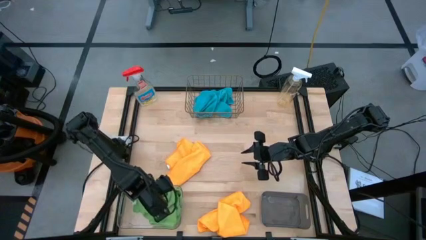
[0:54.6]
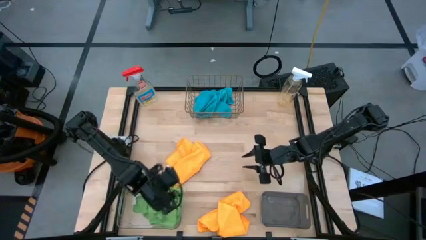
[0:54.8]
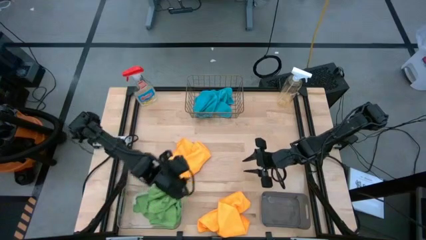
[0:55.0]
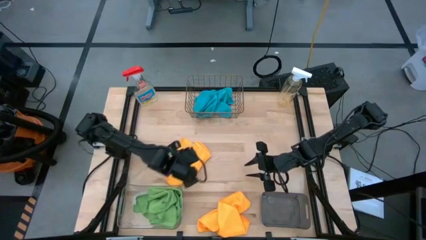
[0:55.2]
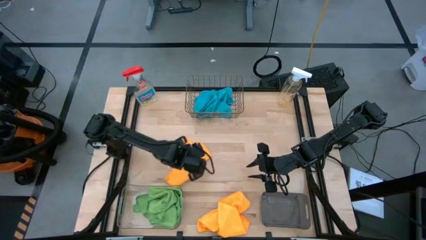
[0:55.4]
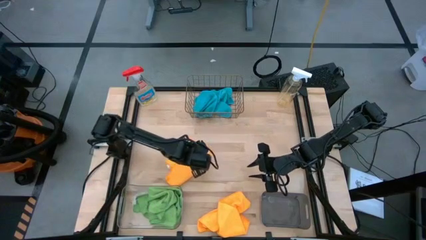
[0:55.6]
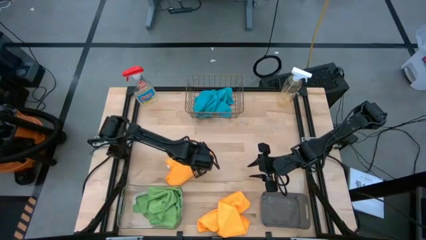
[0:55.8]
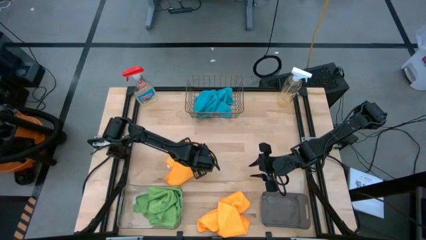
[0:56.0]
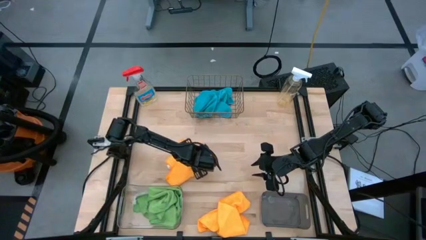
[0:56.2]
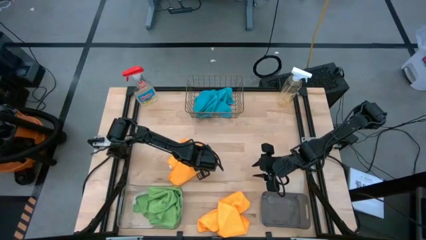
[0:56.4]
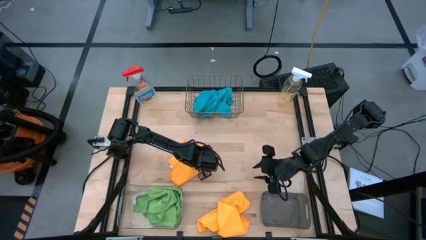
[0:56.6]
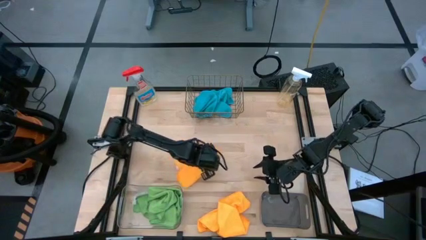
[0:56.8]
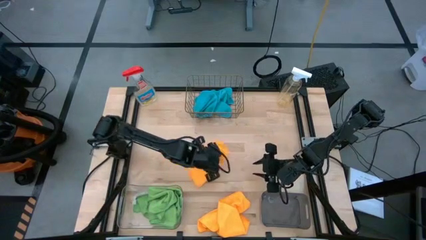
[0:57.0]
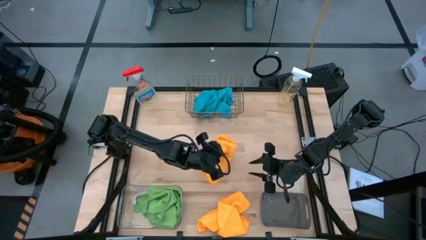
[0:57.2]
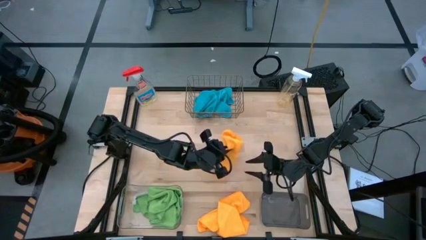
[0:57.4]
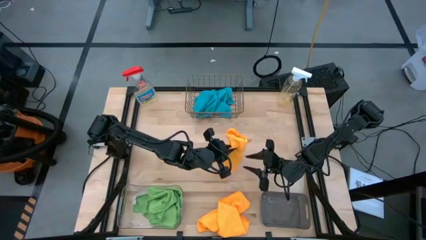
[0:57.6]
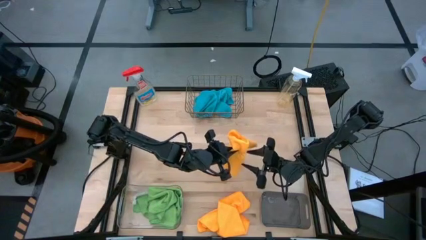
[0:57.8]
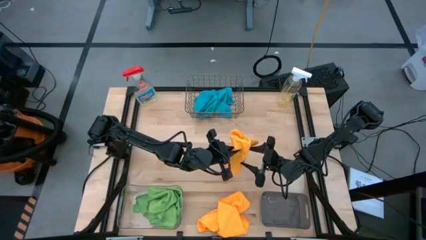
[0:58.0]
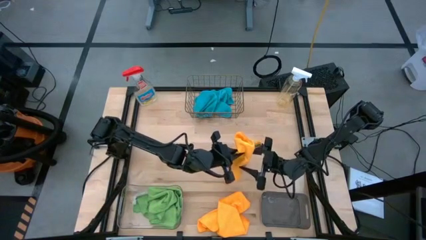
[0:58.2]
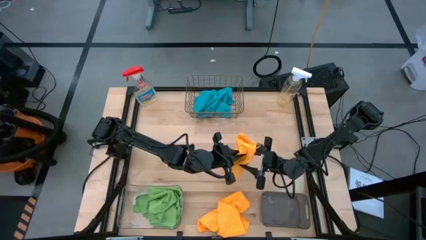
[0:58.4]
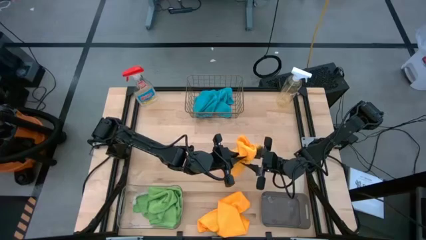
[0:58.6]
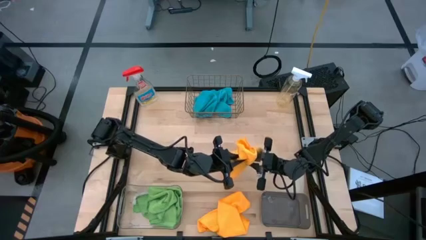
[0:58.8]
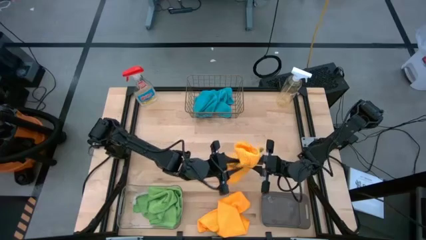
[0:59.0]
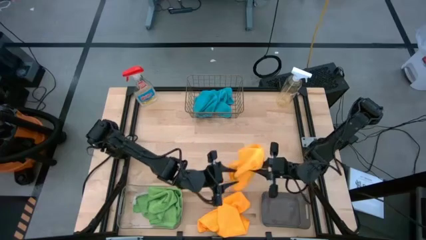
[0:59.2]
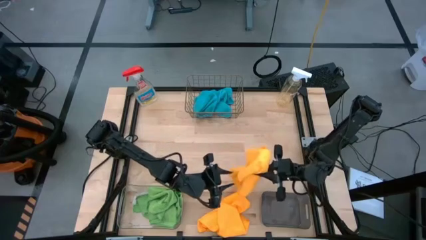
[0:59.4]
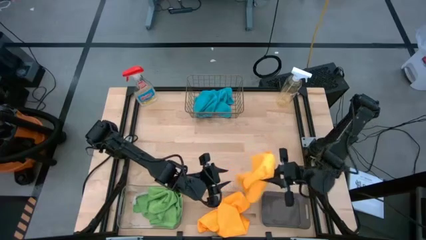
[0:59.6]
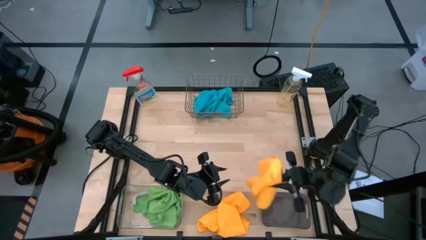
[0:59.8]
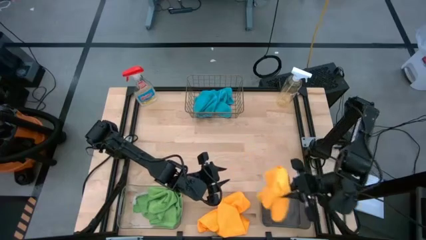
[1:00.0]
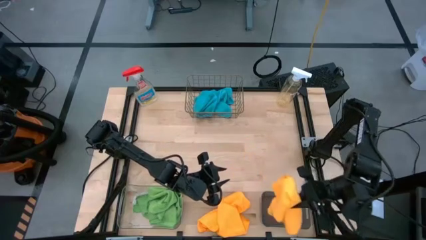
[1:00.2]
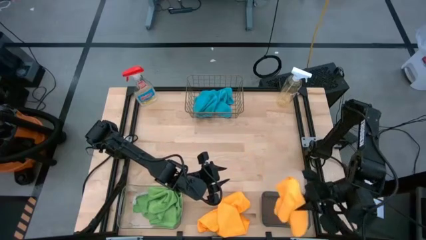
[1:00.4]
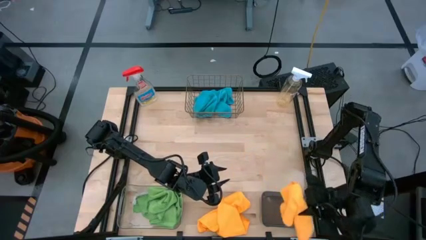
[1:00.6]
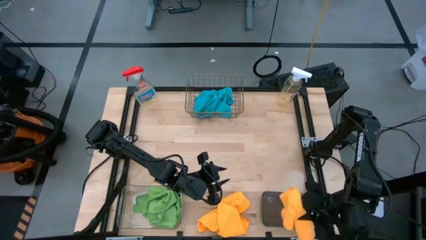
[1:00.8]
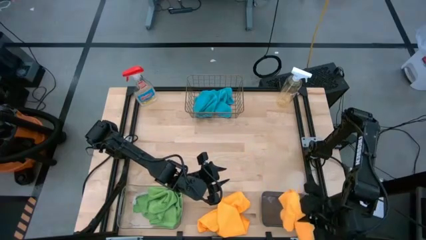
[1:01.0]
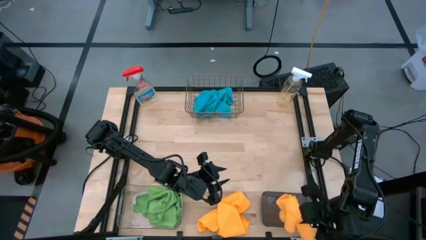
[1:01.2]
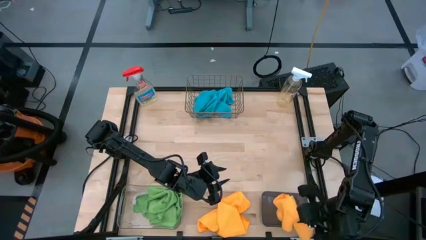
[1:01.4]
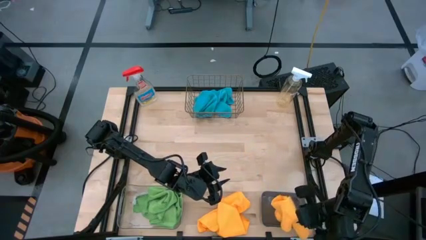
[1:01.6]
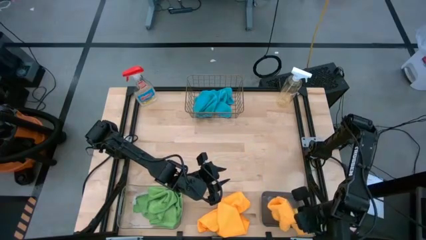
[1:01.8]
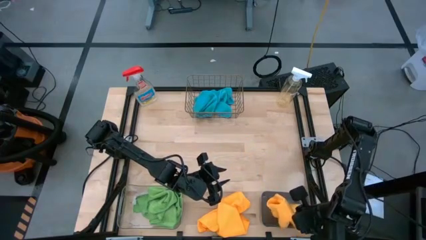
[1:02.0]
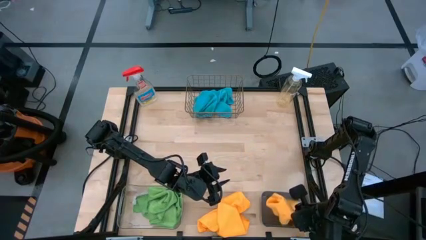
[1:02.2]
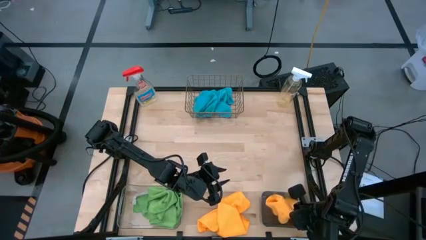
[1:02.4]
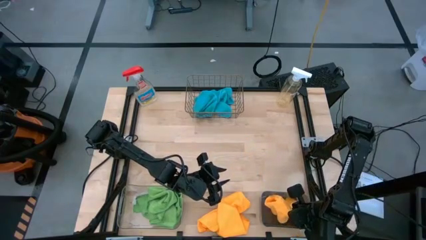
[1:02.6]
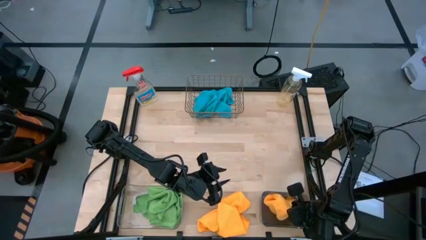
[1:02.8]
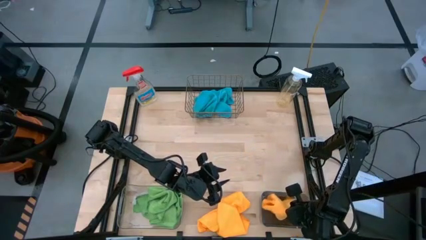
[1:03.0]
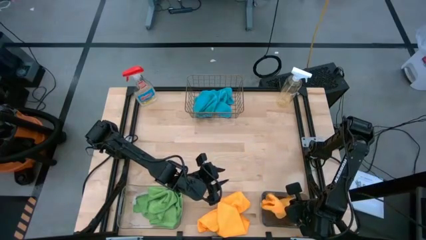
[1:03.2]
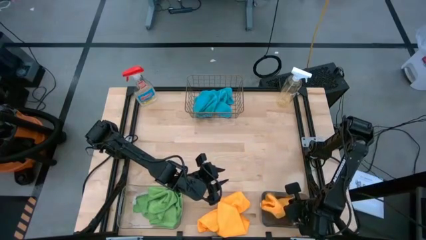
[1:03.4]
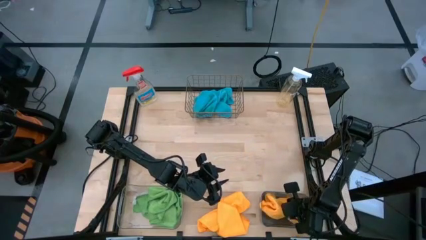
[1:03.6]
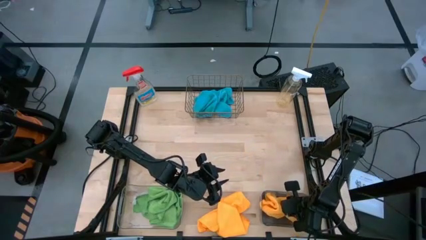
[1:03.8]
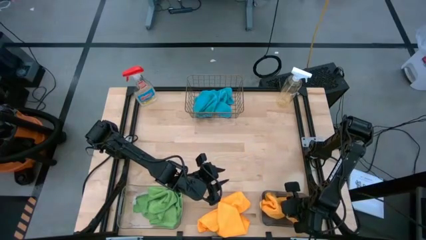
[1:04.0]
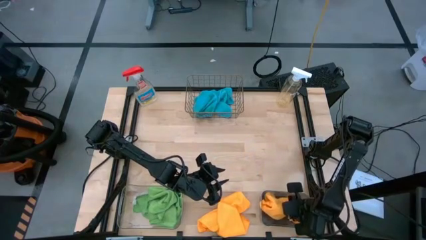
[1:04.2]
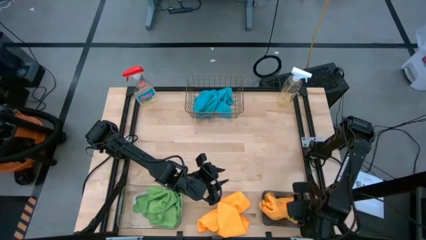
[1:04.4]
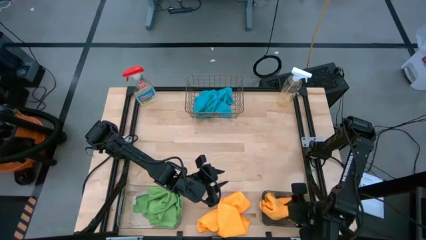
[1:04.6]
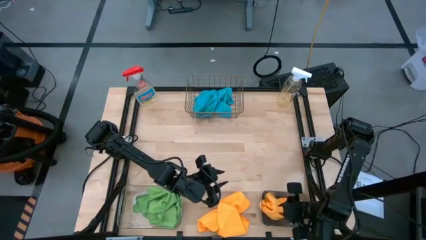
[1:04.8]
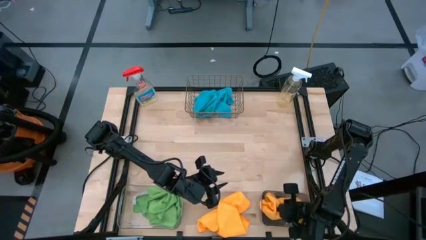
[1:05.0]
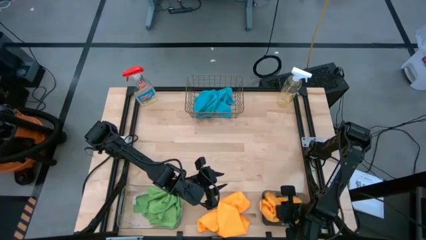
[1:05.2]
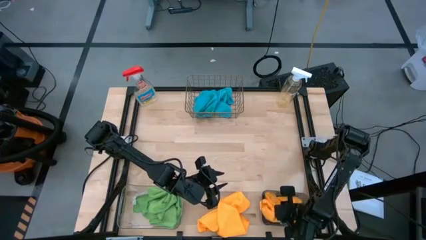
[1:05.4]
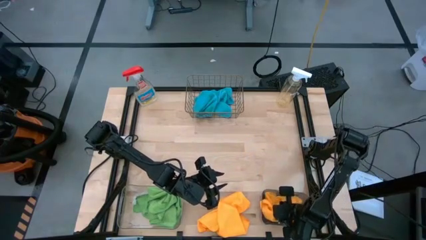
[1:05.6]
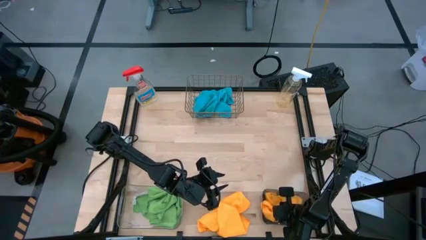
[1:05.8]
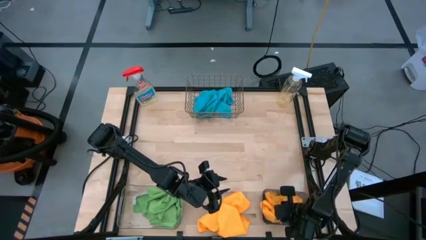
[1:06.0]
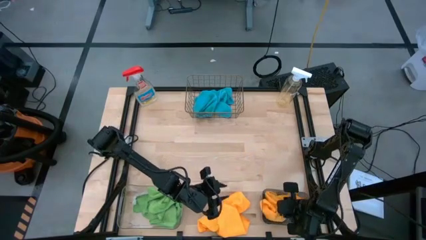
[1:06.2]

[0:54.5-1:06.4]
Task: Sort microfiber towel by color & place in baskets
Put the top yellow microfiber cloth into the black bin
